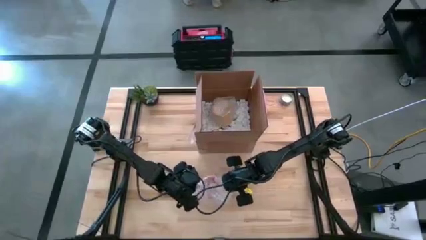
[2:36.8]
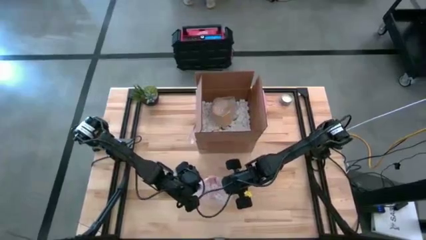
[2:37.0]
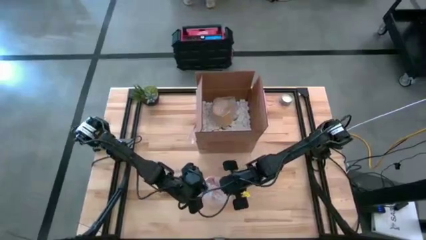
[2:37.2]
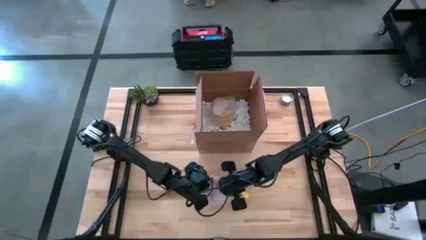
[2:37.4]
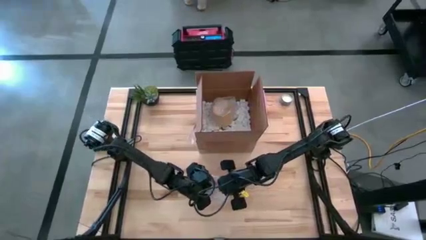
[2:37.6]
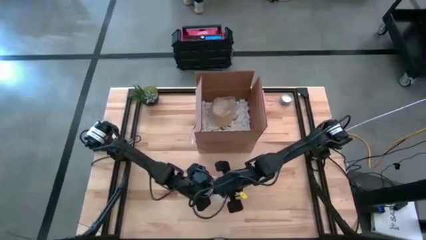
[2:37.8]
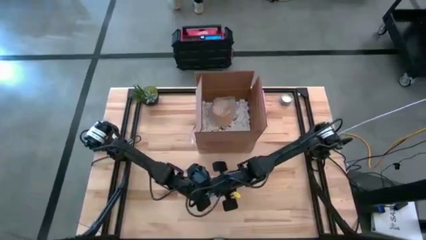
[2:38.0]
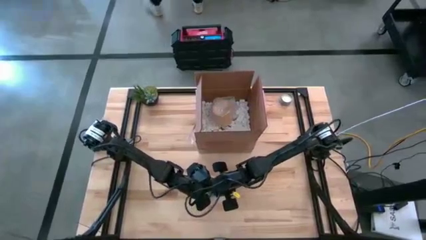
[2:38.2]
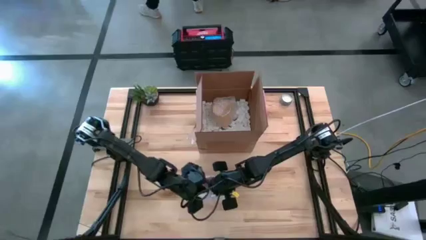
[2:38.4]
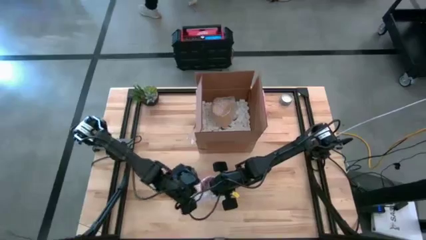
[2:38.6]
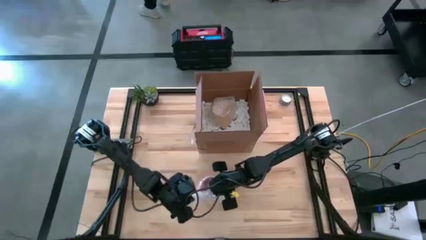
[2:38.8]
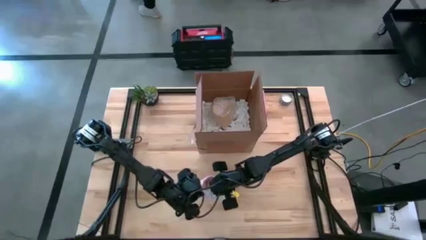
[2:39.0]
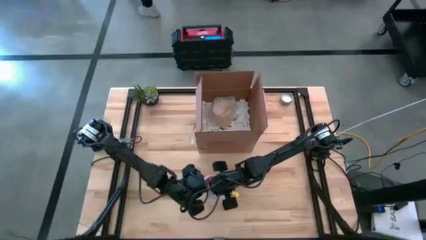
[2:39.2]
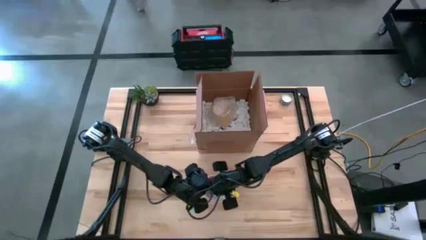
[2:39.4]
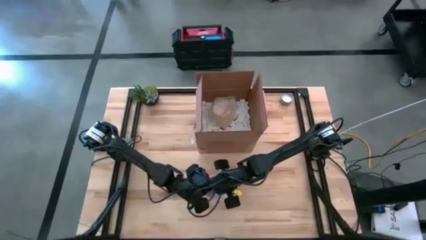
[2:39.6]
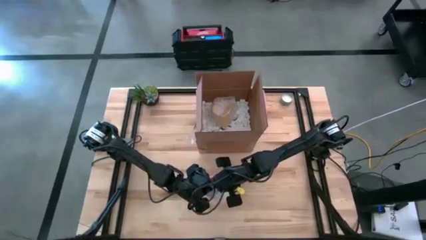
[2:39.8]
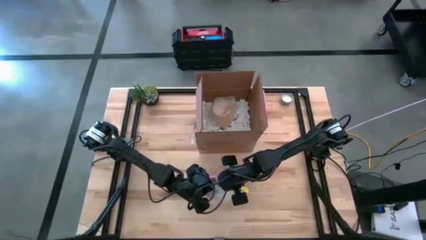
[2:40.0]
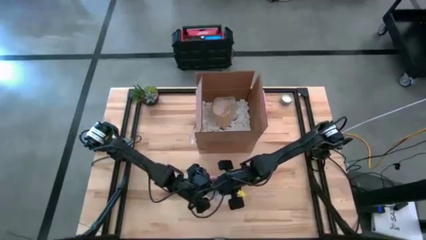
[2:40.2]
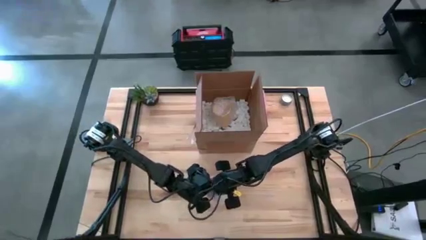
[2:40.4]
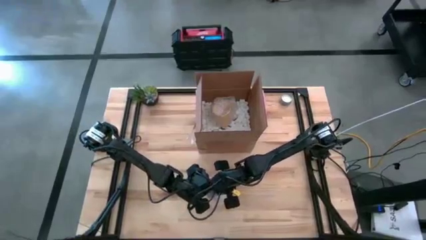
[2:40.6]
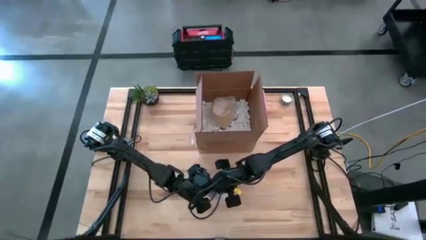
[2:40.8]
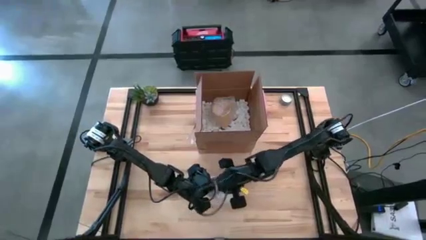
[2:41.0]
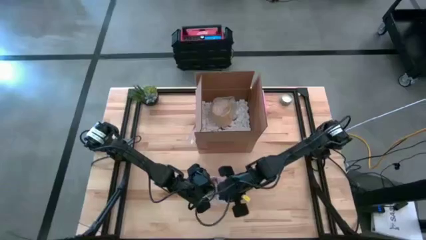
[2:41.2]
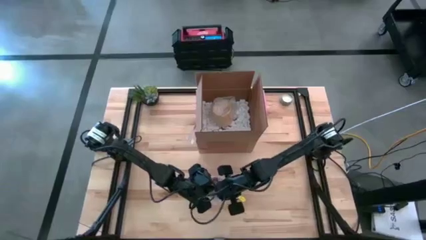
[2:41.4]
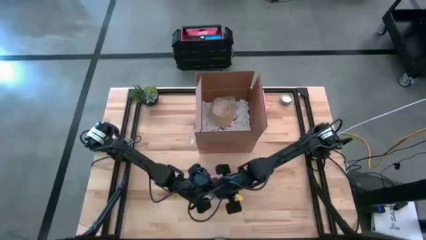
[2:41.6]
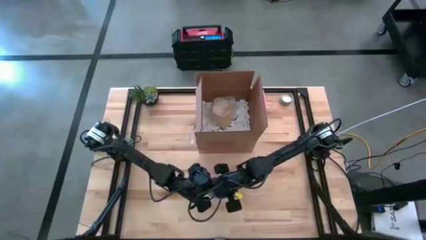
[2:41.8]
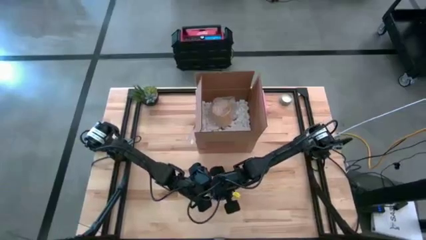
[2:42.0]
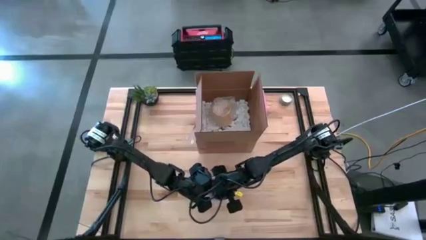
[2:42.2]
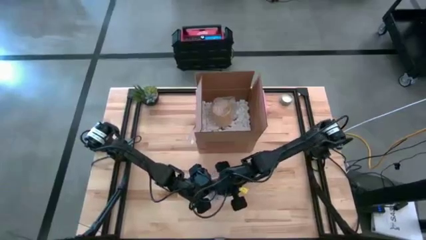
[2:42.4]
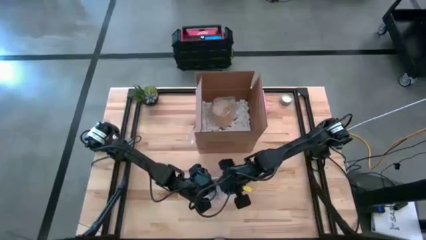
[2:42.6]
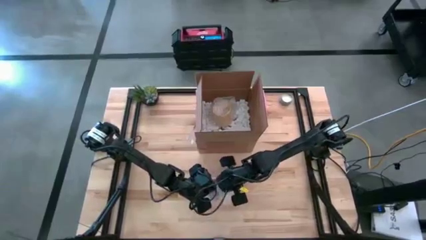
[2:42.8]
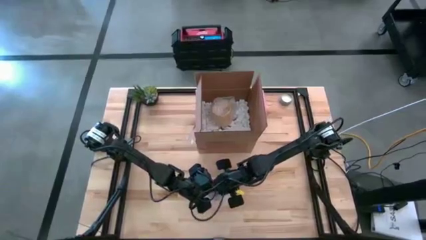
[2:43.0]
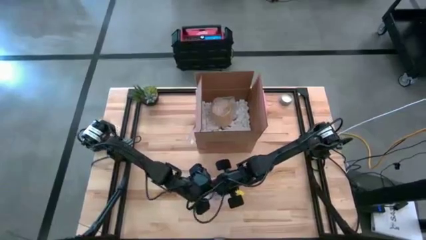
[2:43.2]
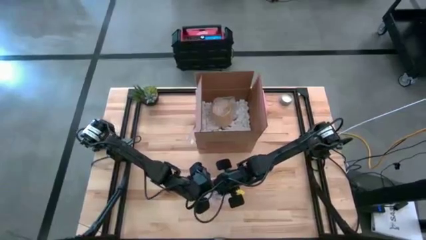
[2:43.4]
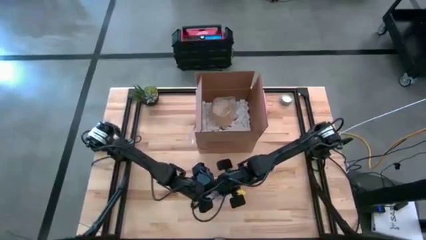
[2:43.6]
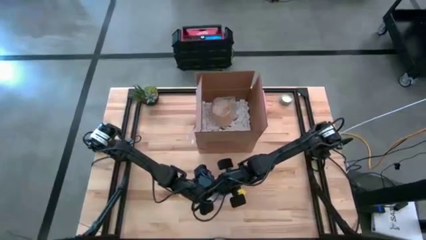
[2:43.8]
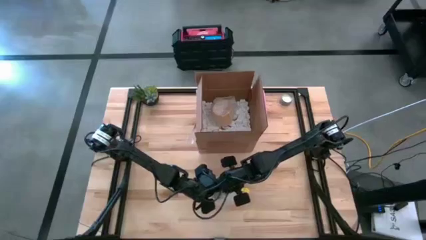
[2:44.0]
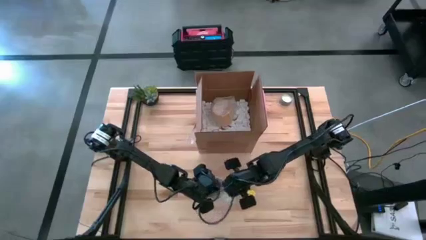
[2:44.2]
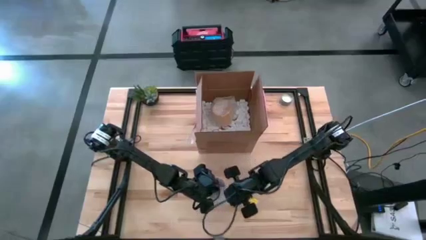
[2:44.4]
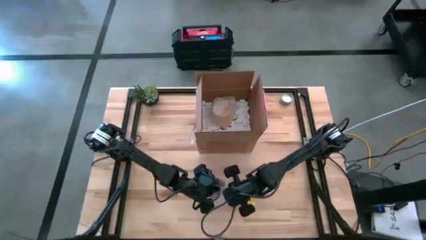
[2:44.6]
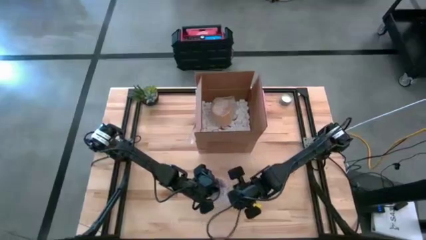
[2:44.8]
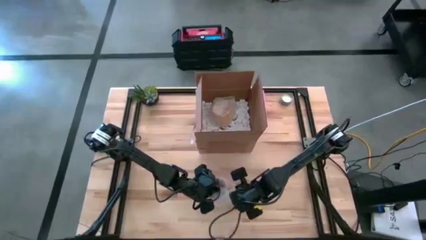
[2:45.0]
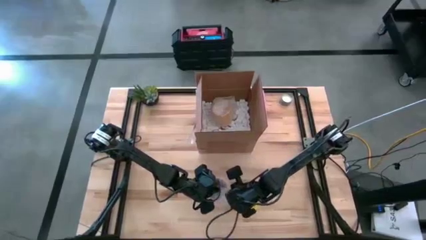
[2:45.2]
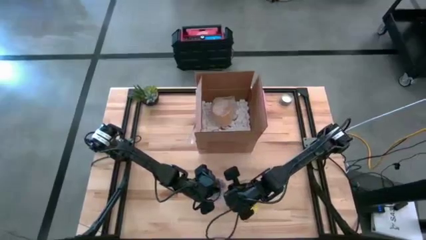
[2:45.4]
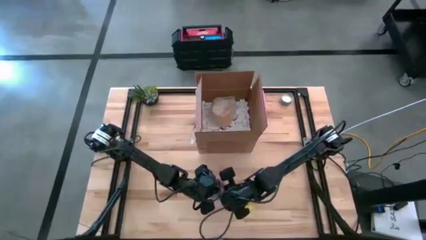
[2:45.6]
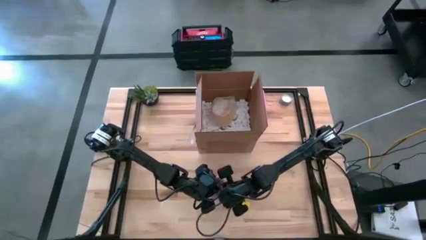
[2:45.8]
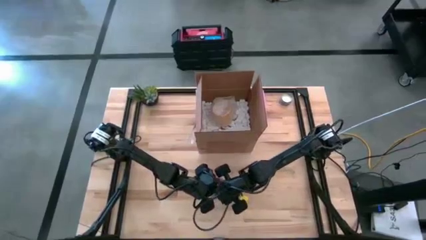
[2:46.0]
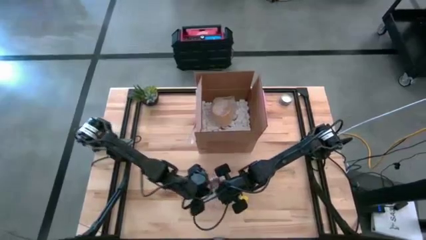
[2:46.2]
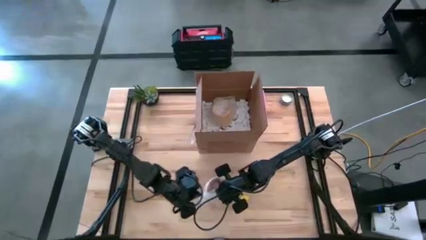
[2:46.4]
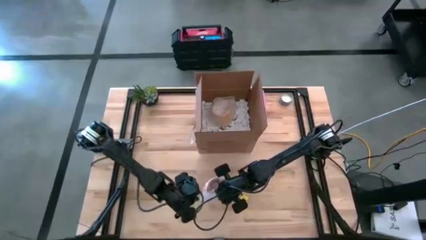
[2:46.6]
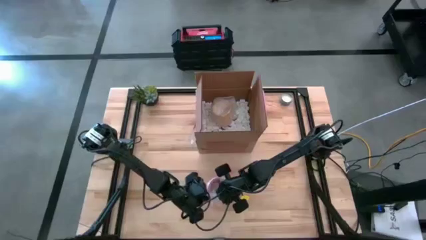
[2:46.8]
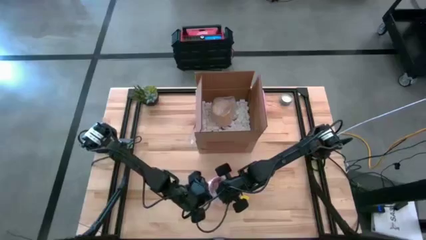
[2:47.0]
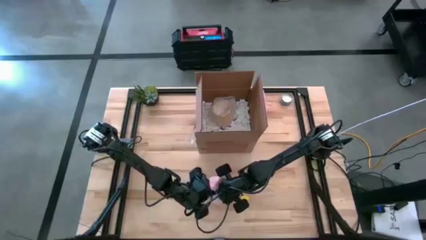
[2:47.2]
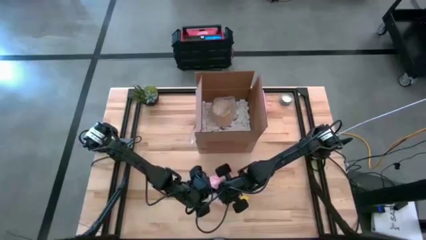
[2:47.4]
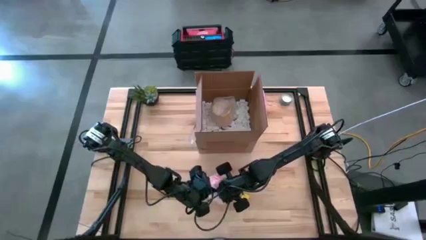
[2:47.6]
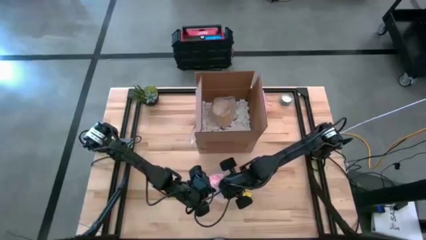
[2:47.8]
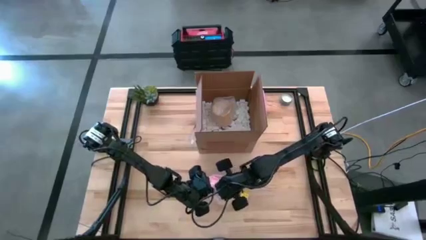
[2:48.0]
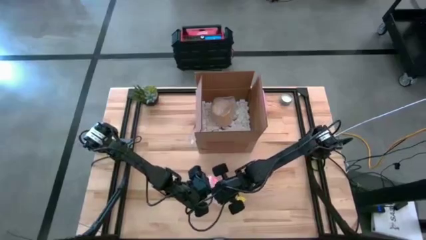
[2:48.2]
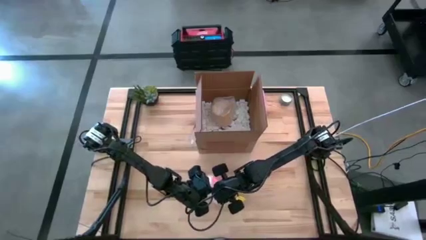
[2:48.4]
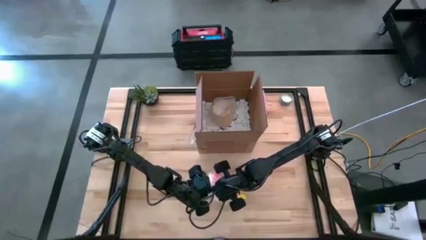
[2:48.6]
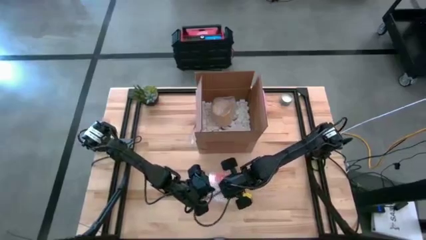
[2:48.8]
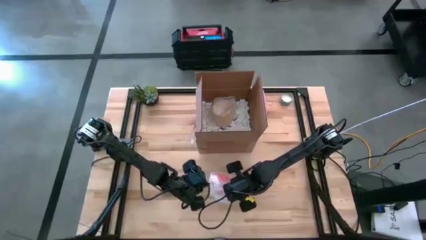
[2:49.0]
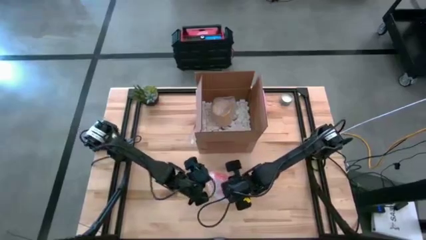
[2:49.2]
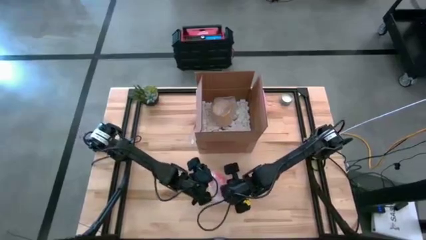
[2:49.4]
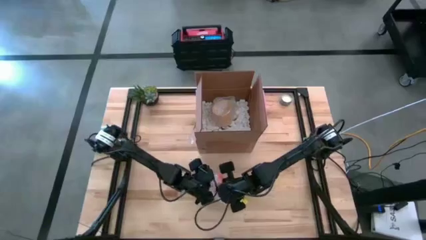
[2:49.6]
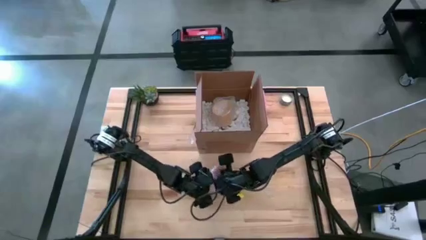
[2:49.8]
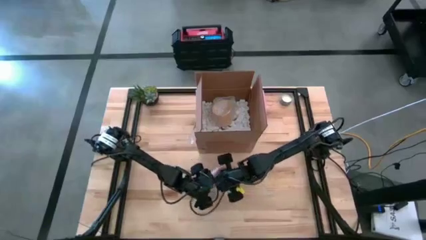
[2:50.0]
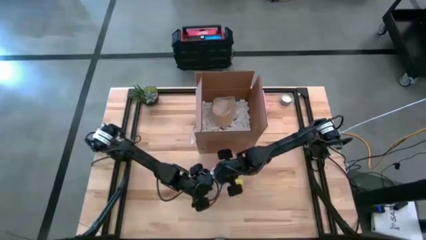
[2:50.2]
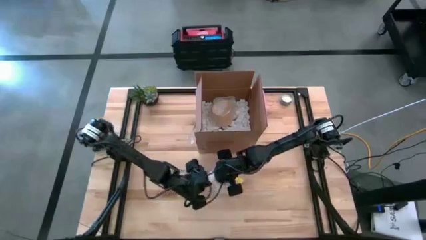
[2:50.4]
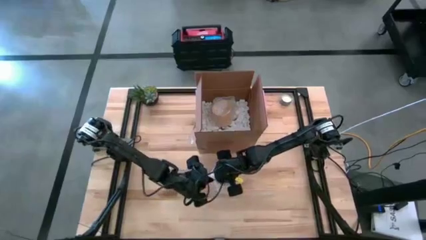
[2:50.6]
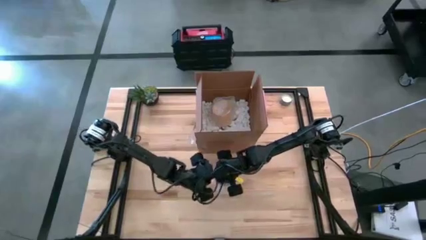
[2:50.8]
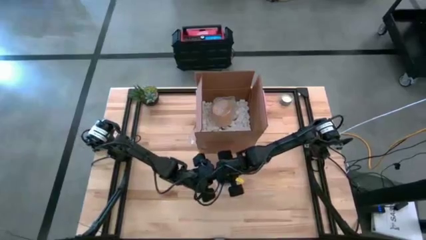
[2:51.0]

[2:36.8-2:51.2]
Task: wrap mug
Wrap the orange mug with bubble wrap

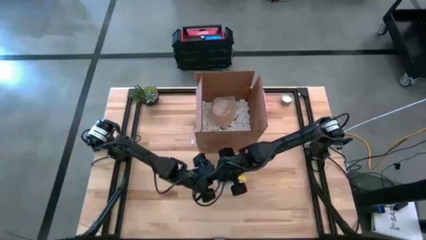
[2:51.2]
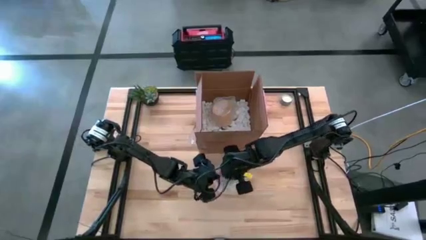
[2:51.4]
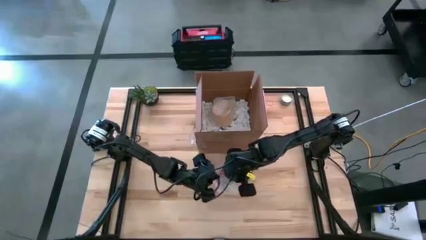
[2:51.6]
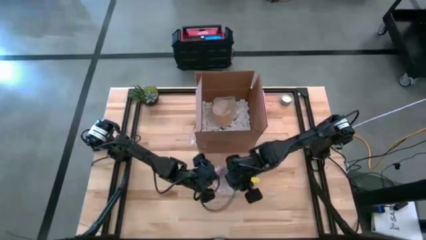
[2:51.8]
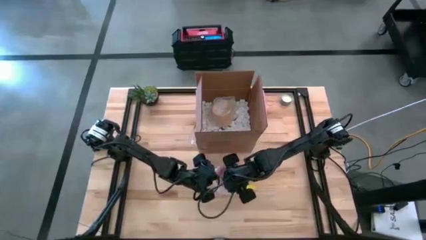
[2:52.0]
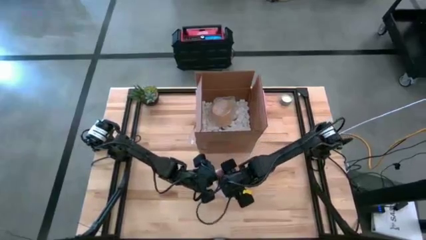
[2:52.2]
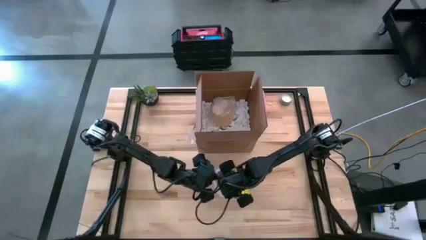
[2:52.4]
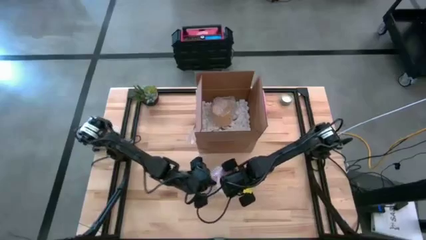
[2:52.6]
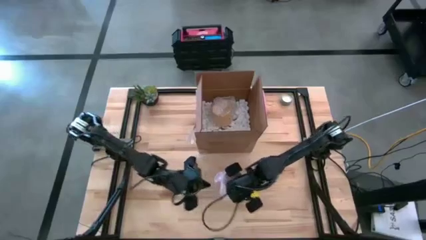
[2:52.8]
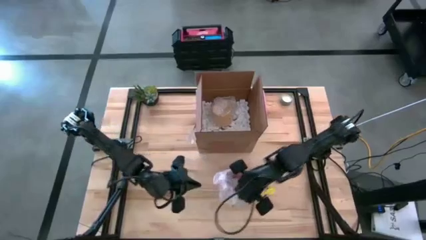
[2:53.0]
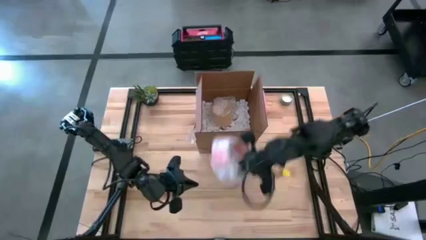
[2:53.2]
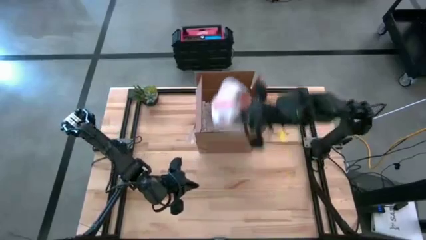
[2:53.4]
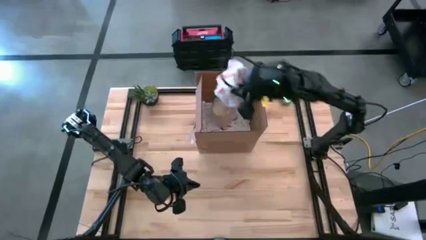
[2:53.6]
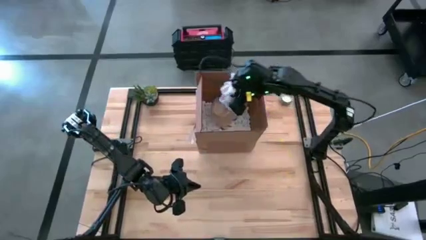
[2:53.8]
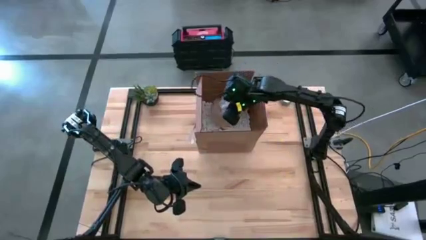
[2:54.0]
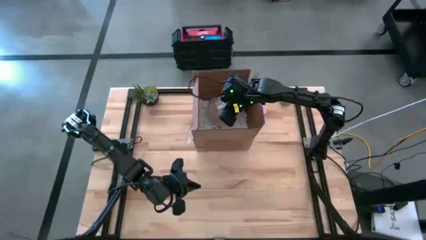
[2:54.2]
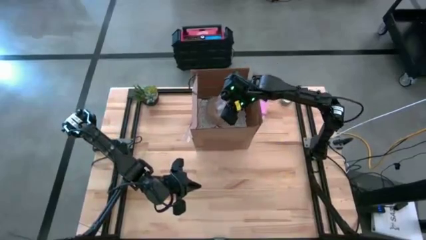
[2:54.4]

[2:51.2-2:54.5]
Put the wrapped orange mug into the box
